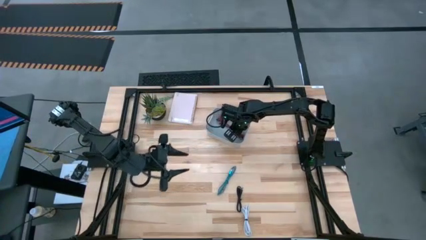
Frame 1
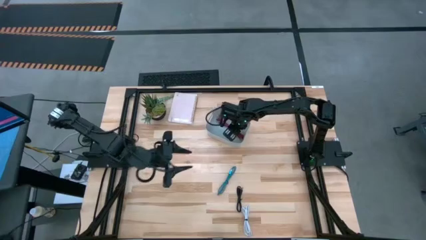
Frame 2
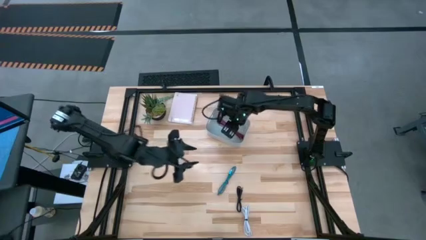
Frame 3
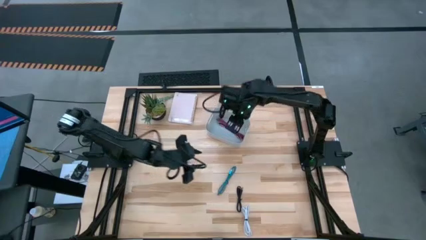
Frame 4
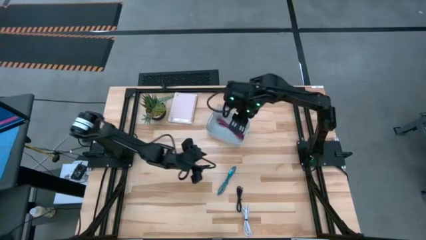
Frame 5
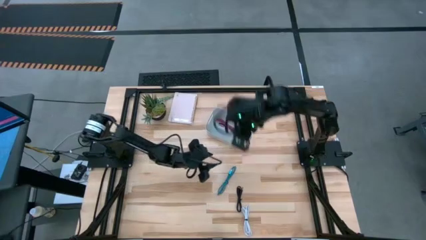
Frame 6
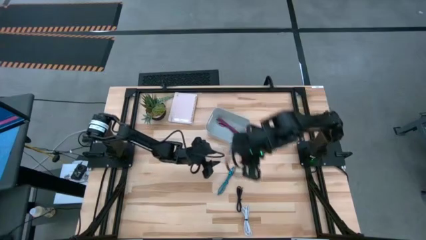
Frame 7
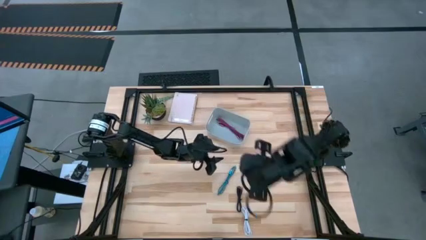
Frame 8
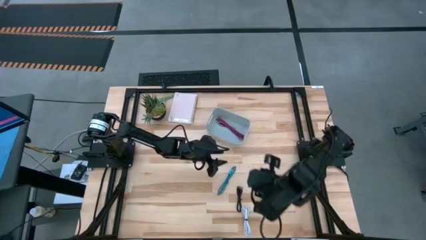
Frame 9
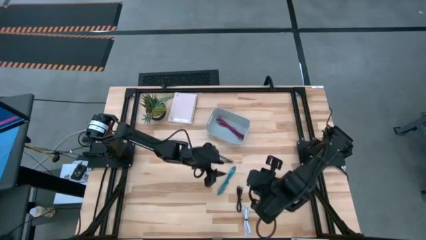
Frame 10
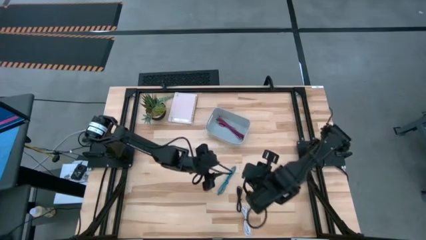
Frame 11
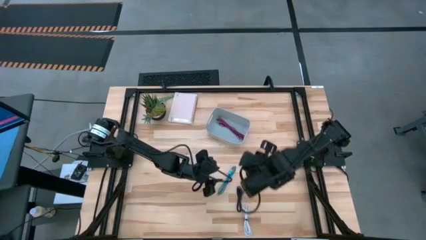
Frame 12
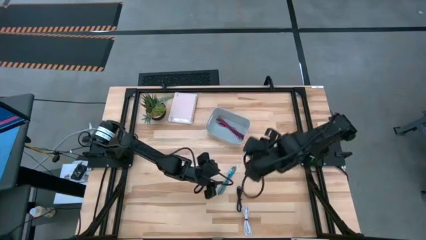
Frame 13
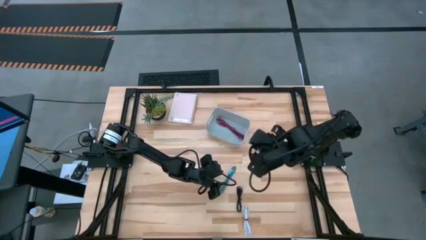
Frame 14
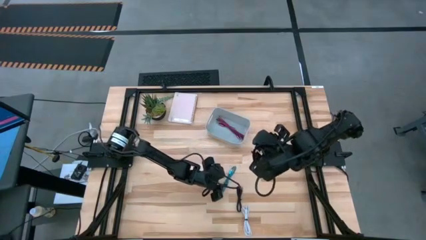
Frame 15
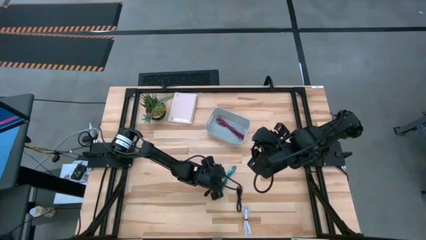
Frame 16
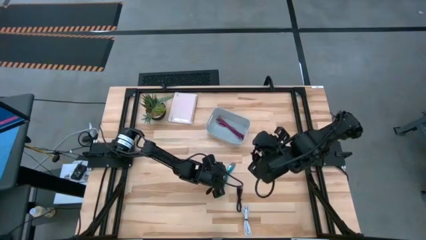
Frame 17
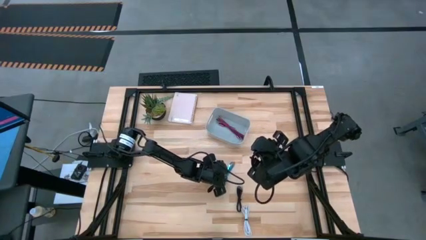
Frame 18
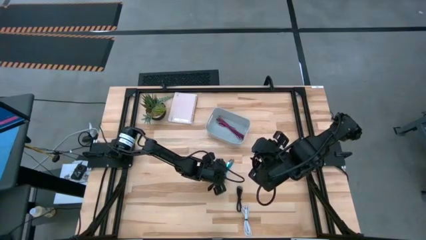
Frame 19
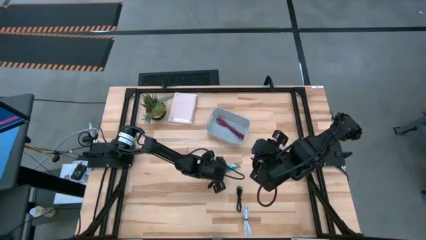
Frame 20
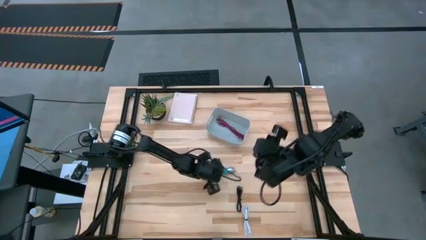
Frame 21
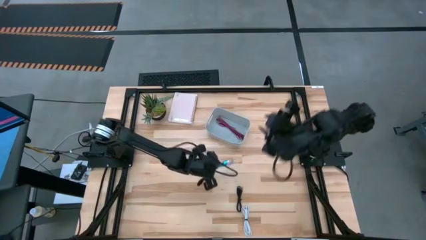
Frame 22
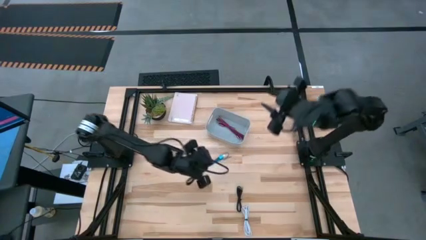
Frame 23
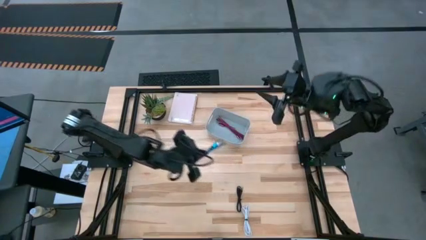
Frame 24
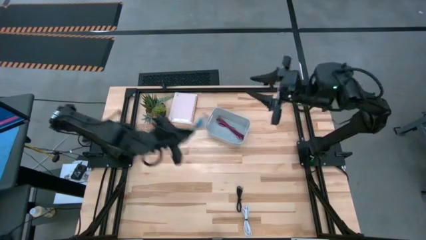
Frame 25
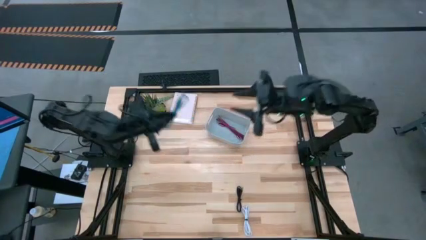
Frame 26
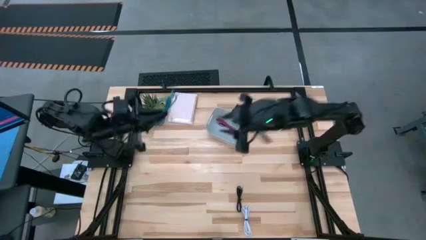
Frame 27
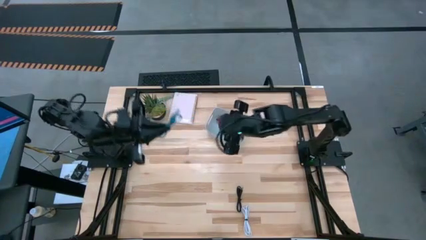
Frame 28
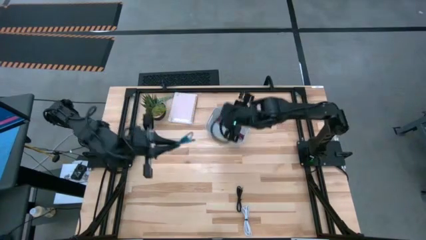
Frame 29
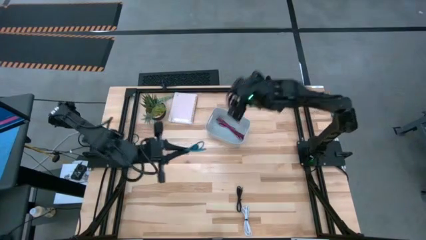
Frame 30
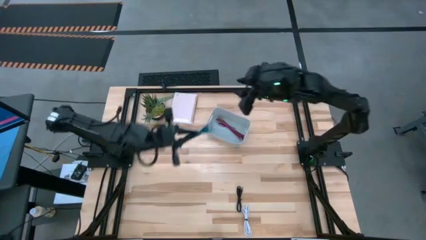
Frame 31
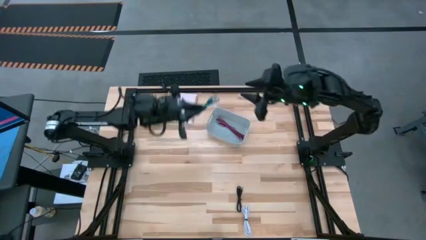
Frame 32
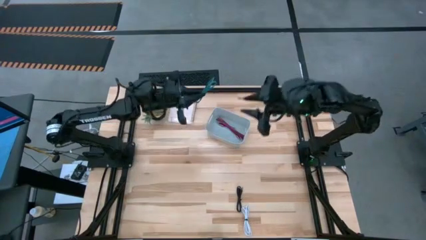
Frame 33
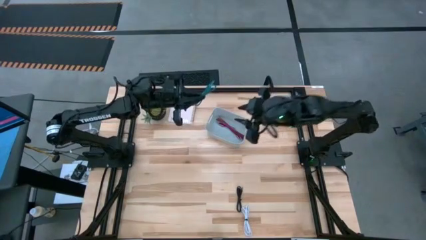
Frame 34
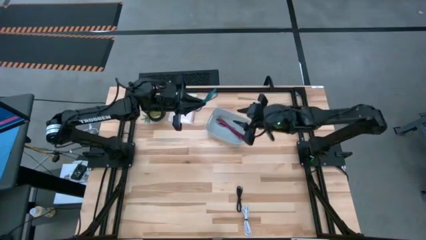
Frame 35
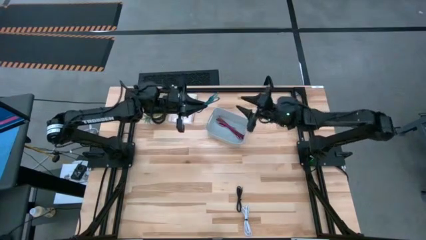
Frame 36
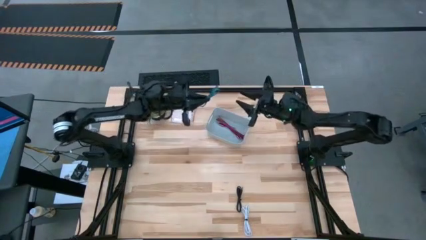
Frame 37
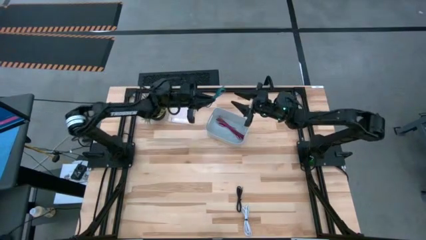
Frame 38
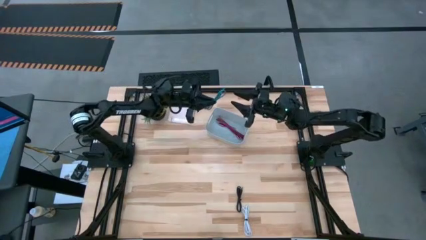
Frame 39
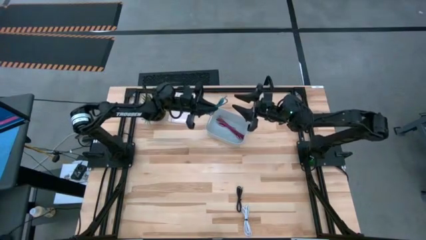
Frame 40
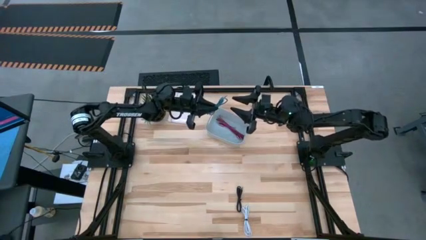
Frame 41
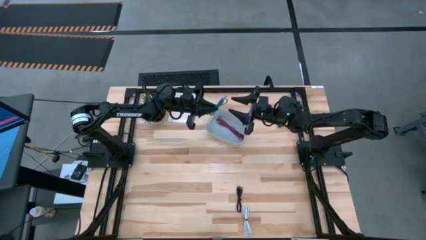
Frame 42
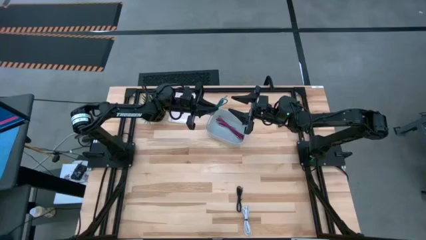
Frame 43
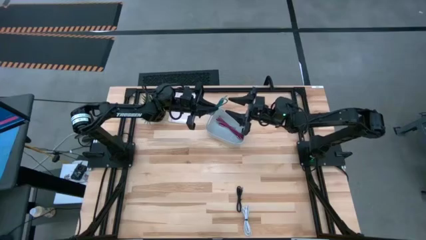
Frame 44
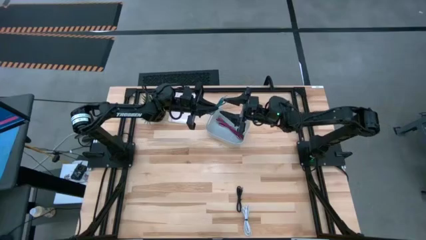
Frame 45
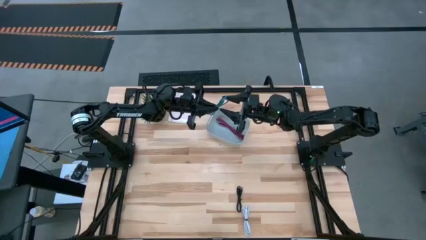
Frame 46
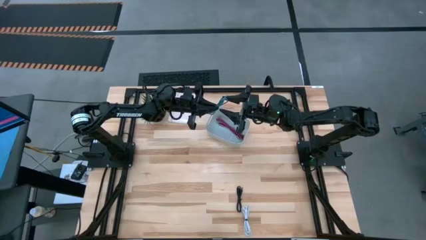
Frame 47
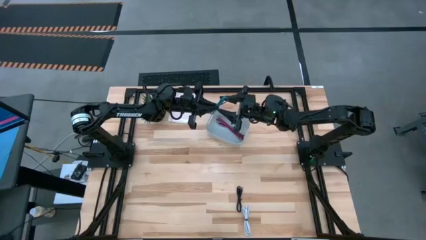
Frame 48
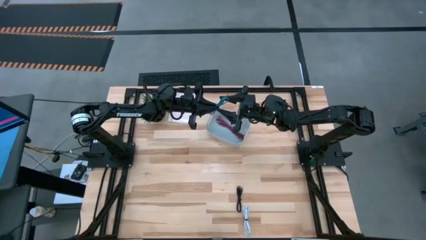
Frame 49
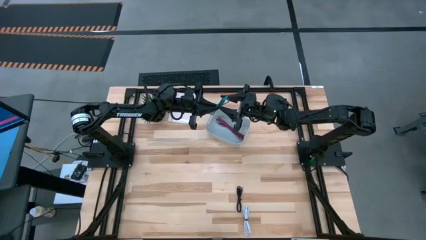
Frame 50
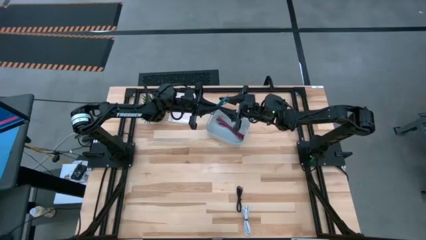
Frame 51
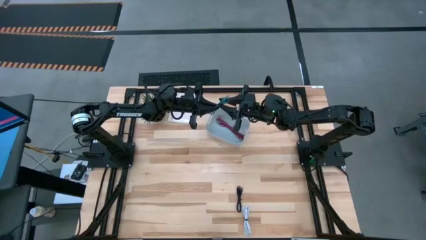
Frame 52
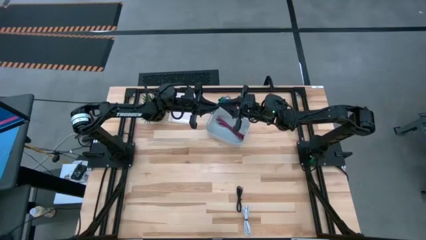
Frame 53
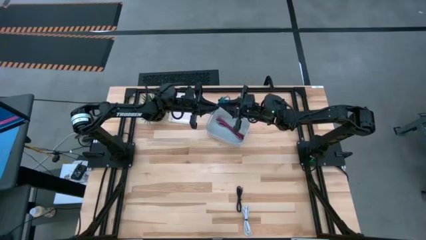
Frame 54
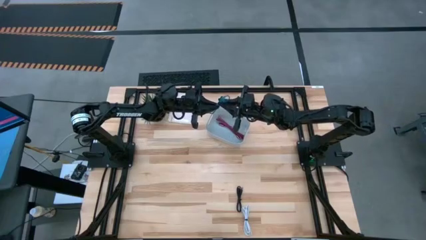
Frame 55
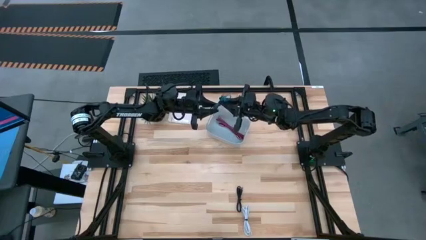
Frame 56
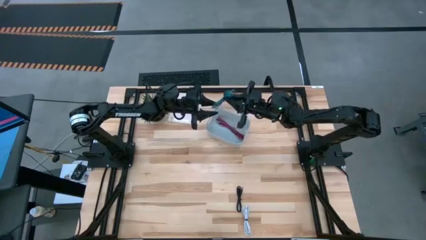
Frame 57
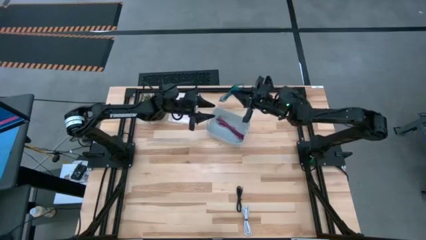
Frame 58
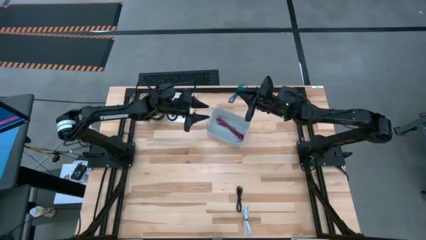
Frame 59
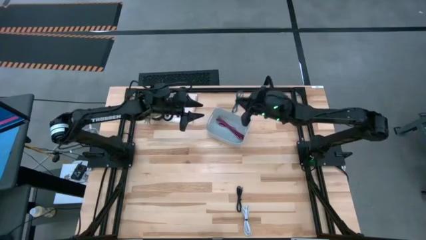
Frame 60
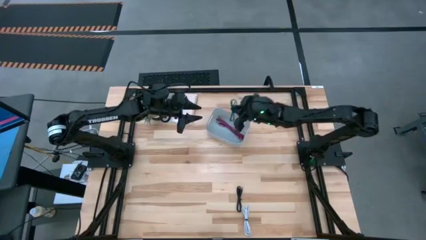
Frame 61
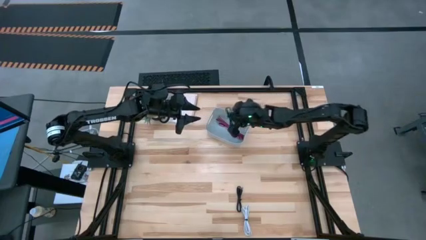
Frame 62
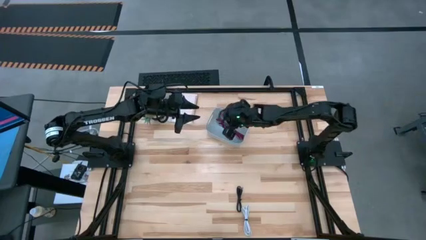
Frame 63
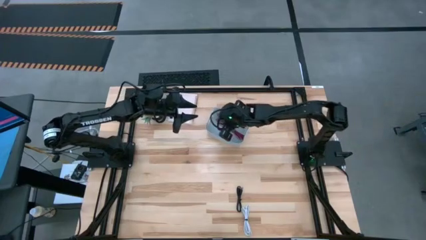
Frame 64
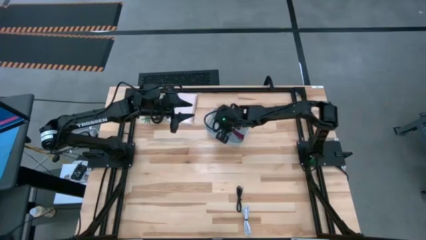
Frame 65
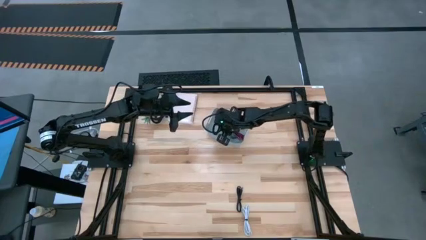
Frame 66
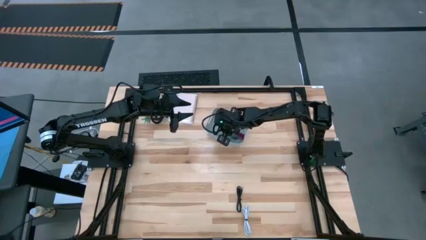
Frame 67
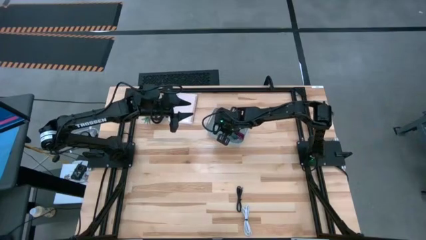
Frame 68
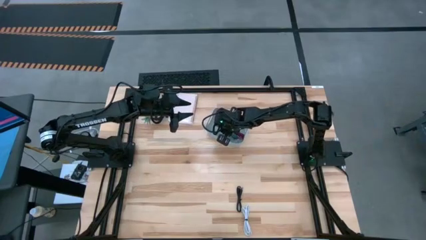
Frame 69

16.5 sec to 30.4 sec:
Task: Pick and place USB-C Cables
Put the blue charger cable into the gray bin
